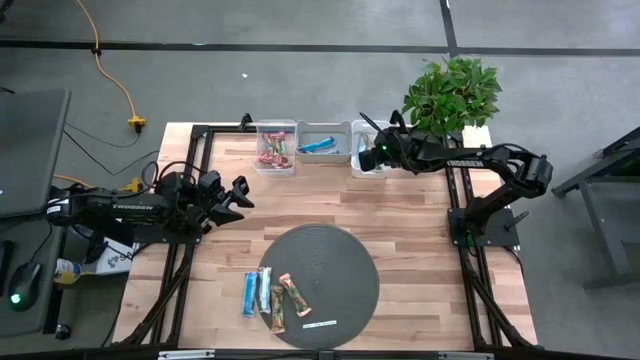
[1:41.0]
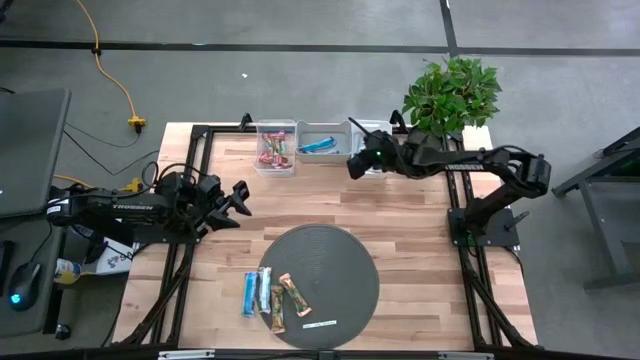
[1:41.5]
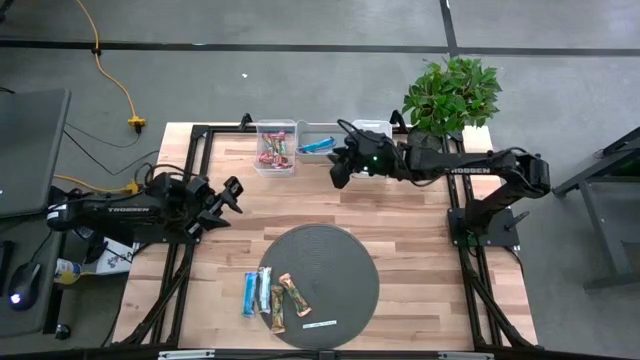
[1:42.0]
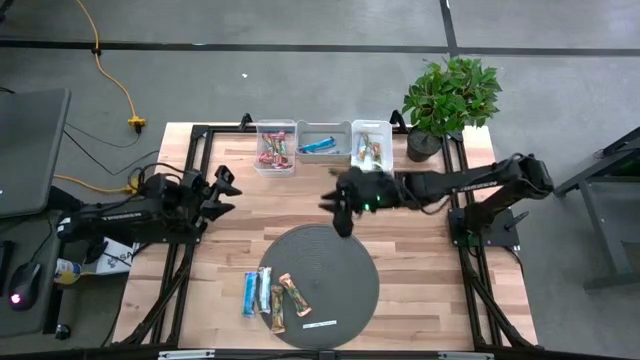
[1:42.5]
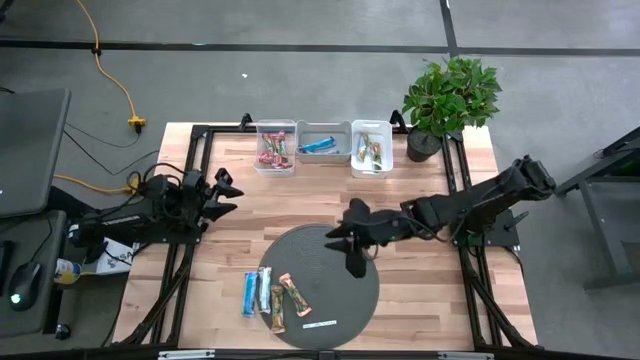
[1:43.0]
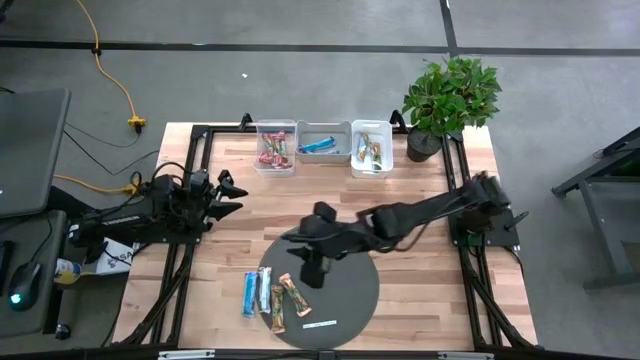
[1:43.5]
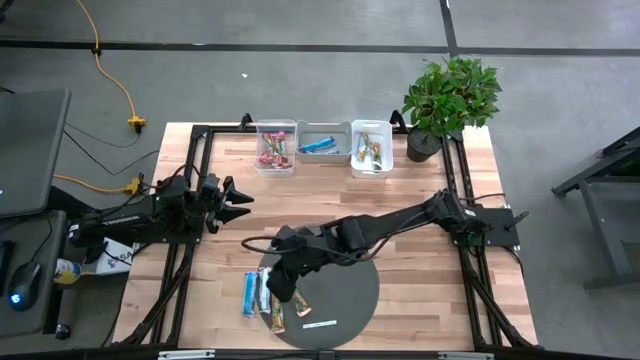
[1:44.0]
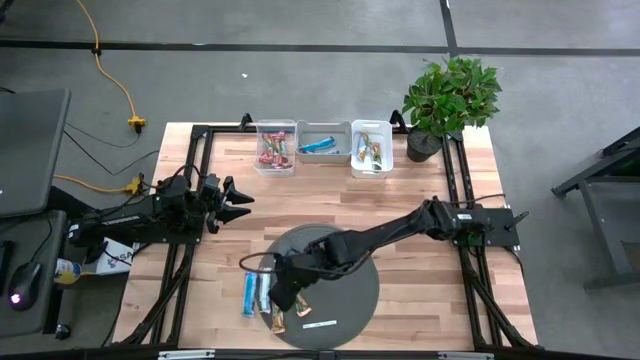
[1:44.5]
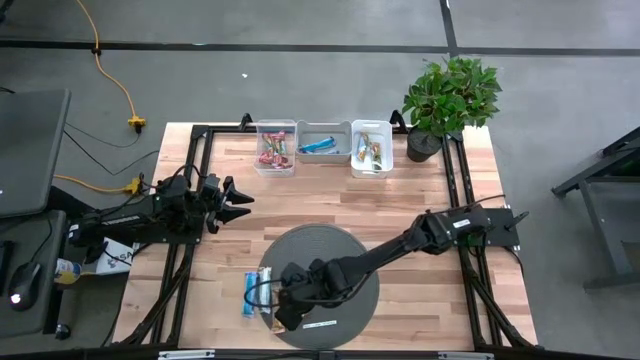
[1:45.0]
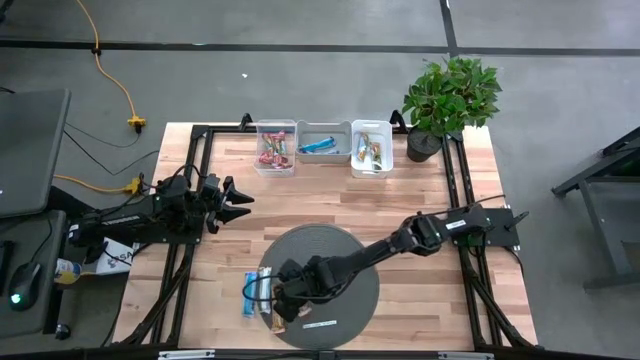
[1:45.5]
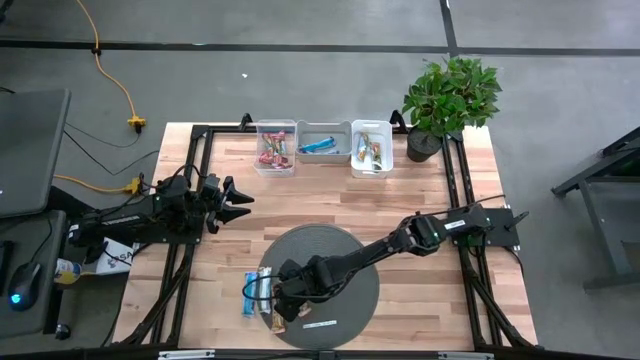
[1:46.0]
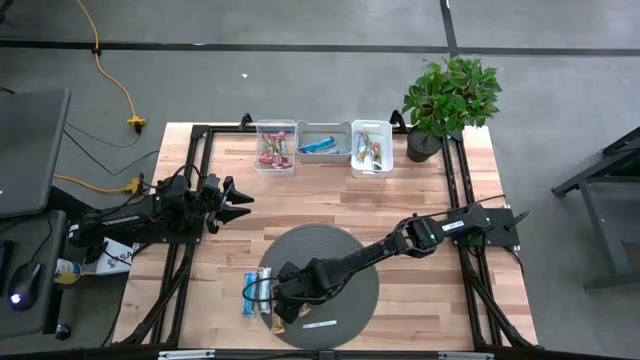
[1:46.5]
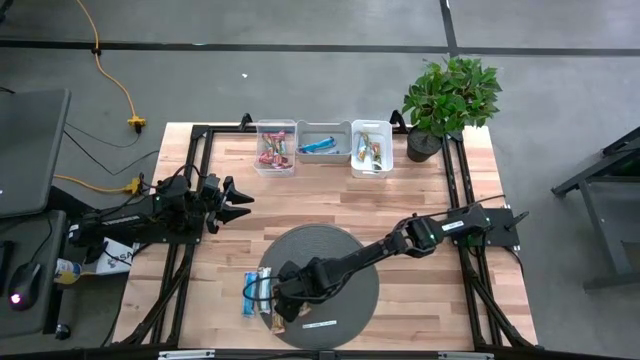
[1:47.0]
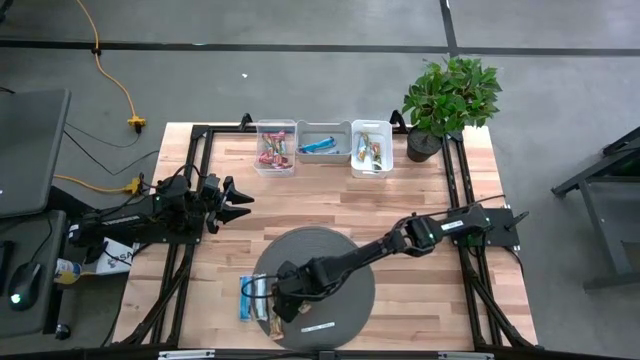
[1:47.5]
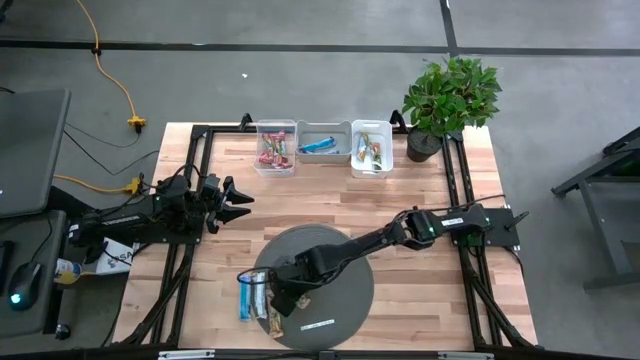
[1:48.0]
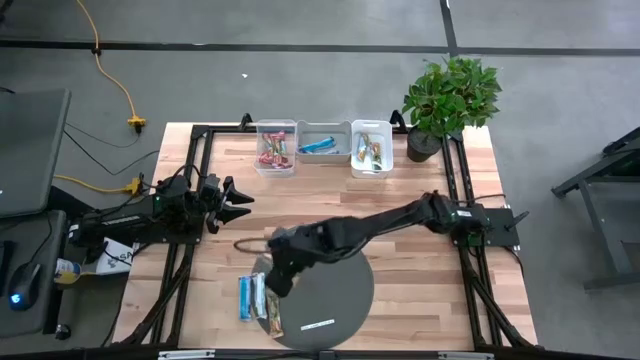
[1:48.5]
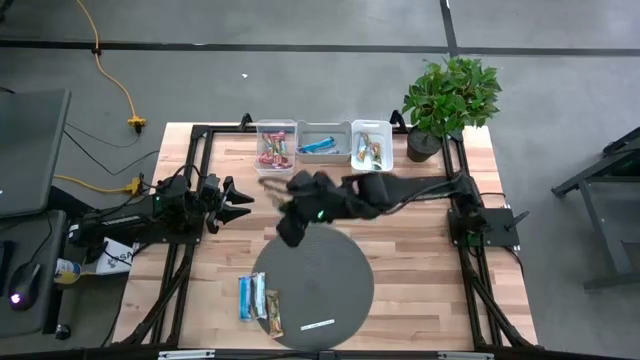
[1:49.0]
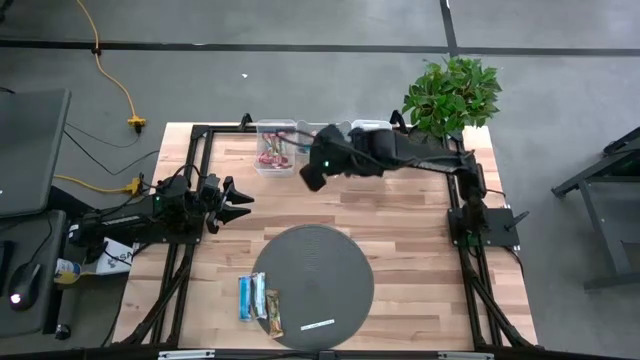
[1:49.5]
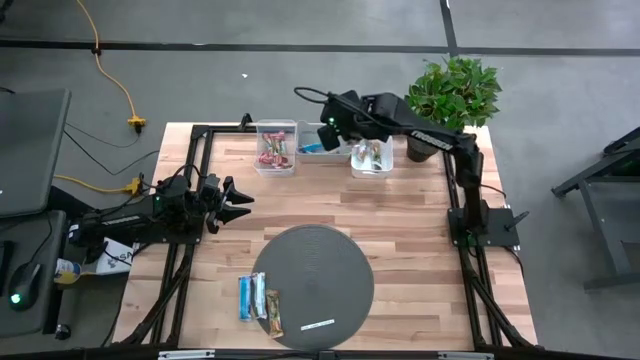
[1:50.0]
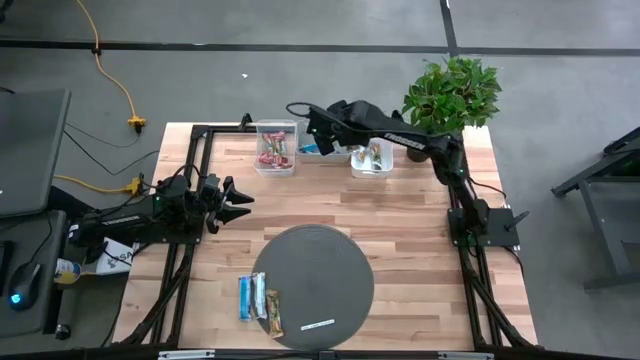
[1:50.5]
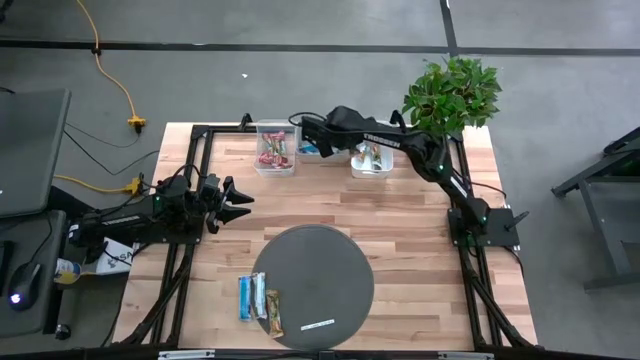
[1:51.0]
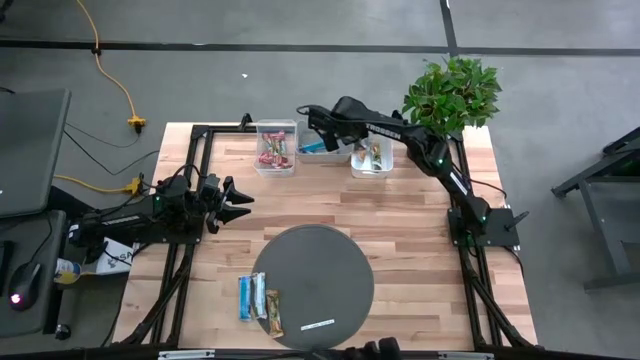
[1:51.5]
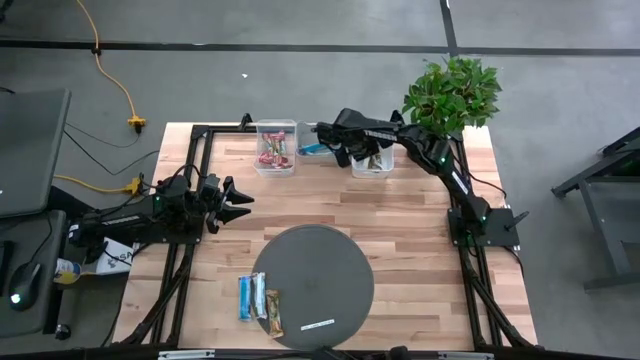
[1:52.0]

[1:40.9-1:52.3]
Task: Pick and place Granola Bars by type
Put the orange granola bar into the white bin

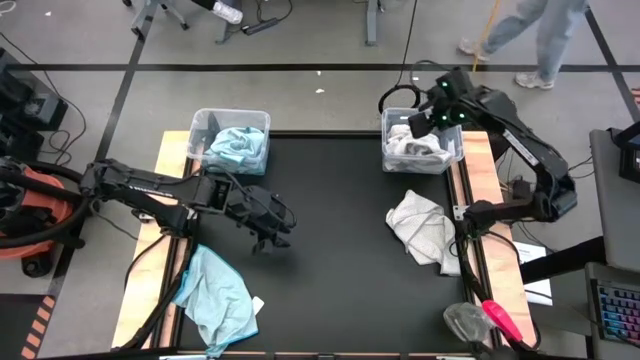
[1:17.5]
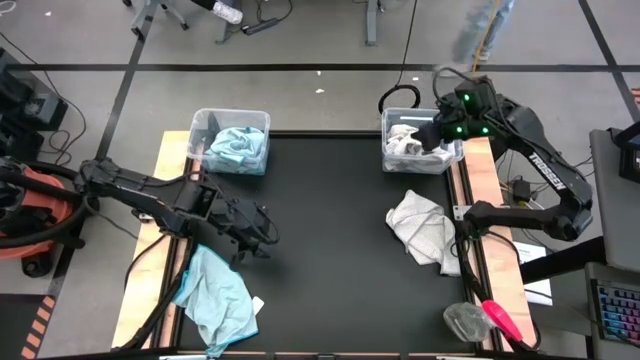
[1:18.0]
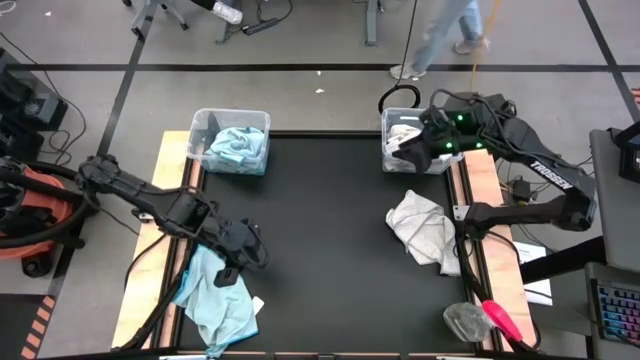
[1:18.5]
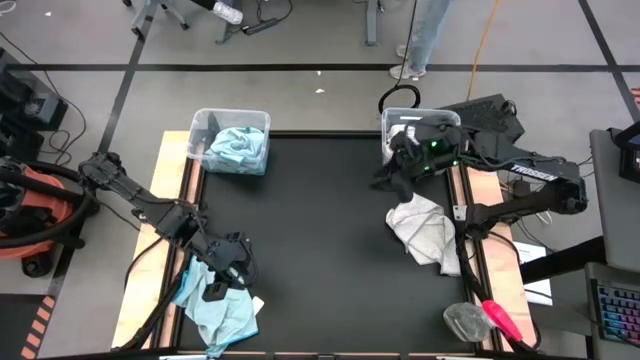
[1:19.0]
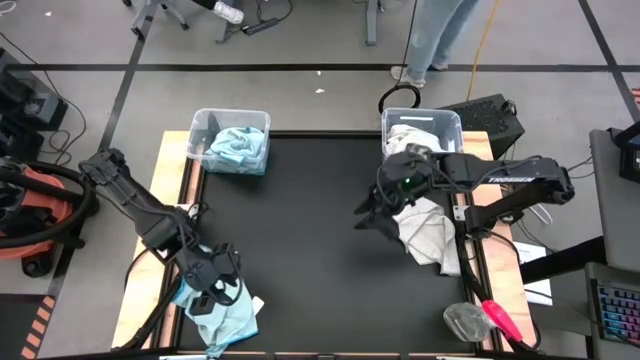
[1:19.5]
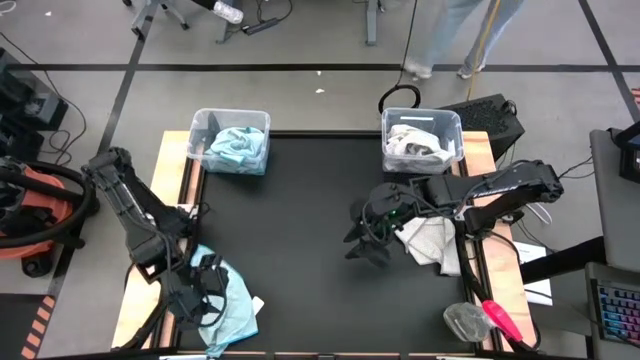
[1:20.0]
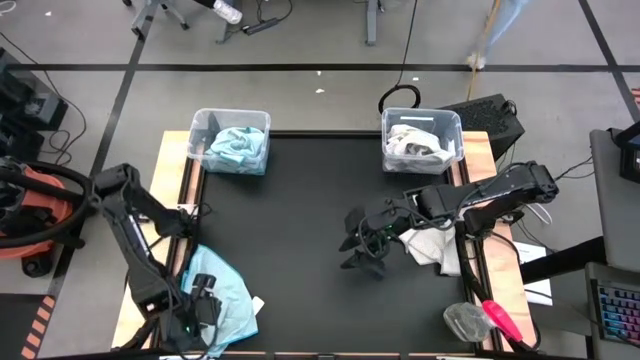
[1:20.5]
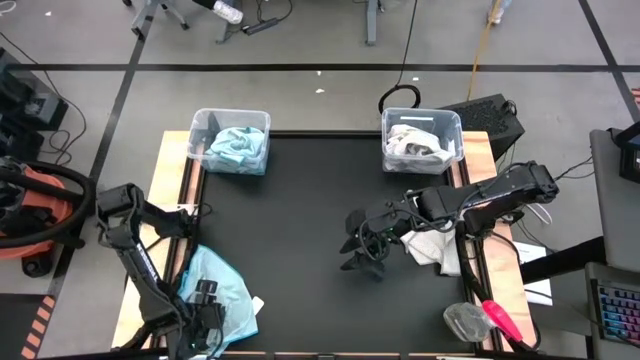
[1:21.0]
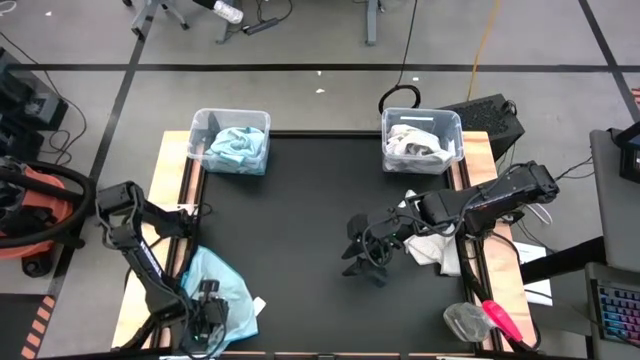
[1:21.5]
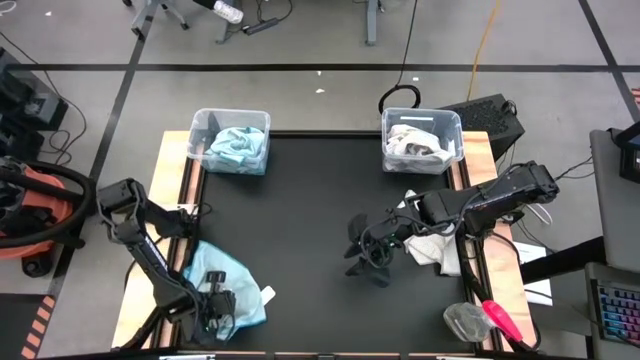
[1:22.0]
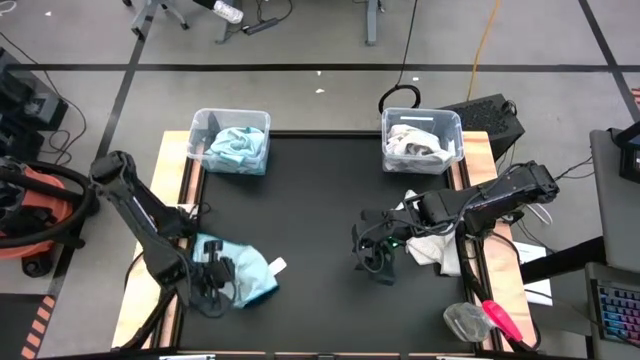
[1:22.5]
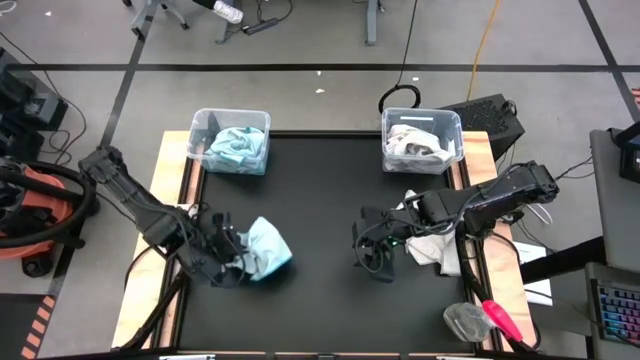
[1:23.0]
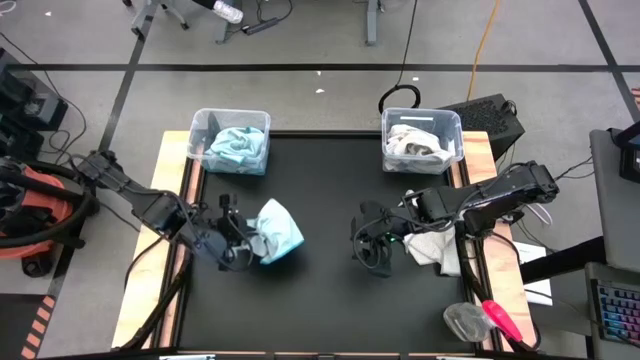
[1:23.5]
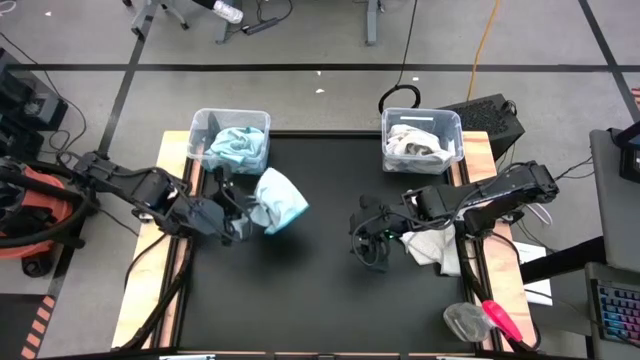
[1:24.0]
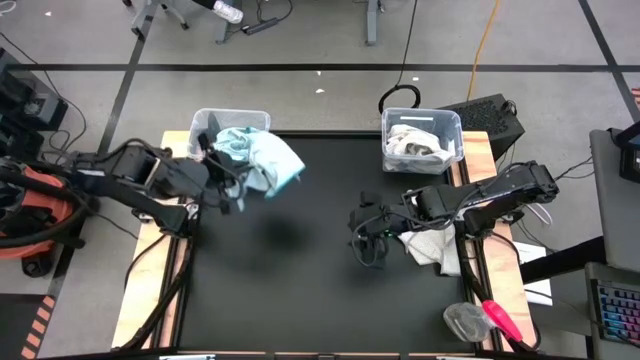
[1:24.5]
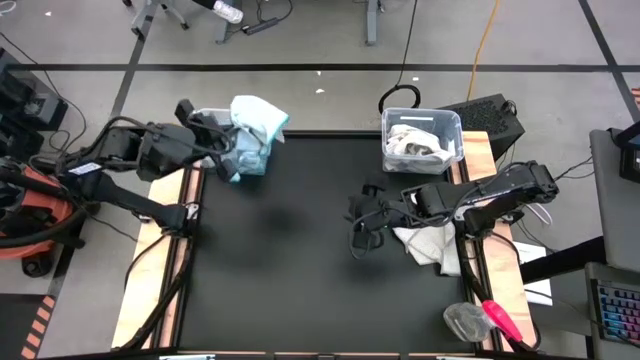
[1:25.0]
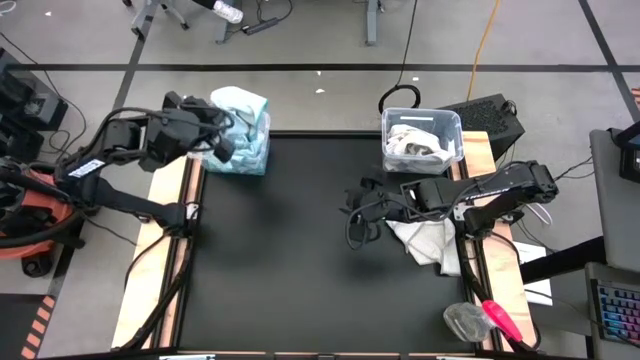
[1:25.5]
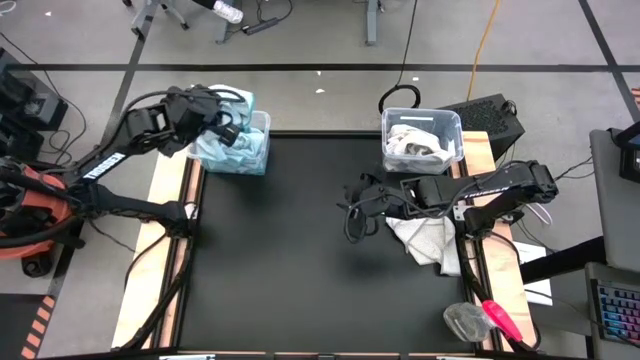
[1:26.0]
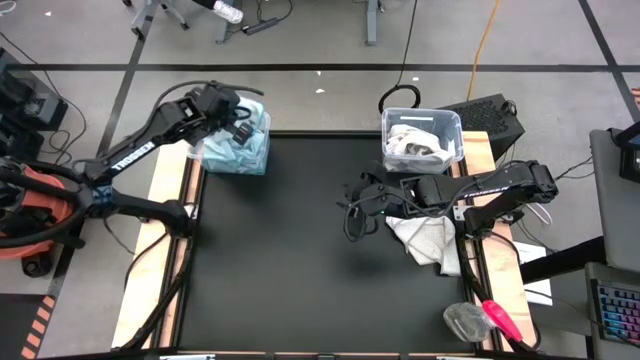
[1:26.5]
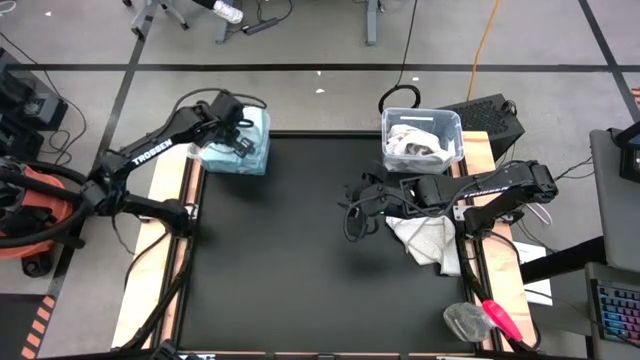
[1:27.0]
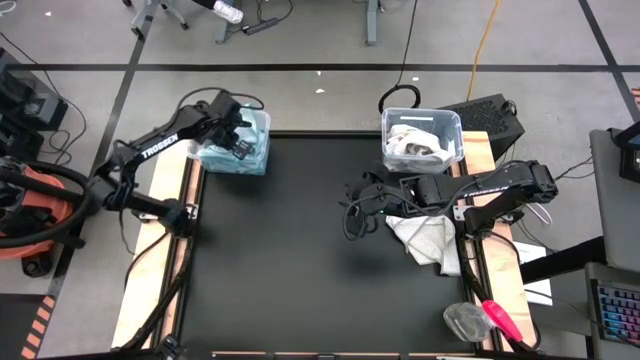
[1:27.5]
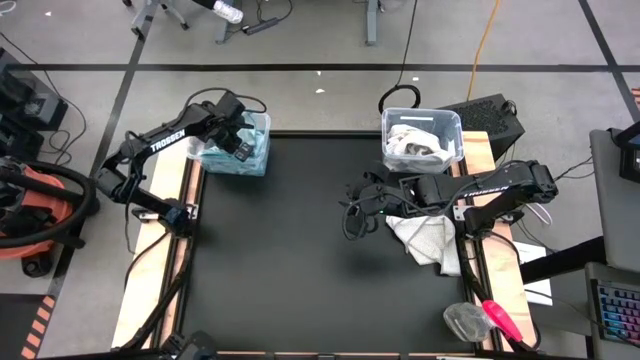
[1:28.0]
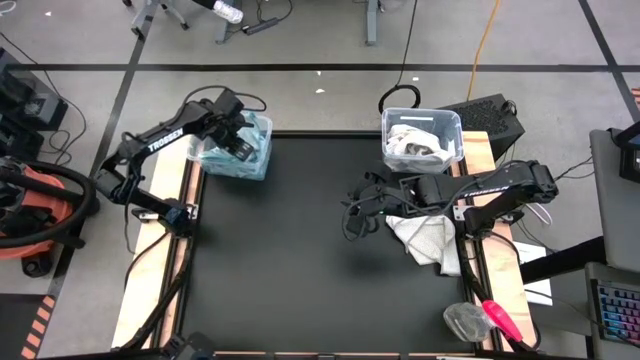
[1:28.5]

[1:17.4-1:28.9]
Task: Sort microfiber towel by color & place in baskets
Put the blue towel into the left transparent bin
